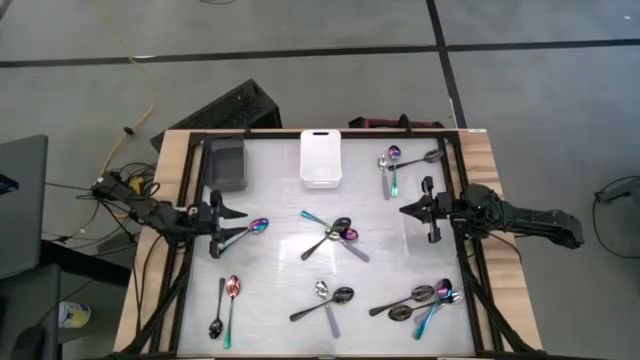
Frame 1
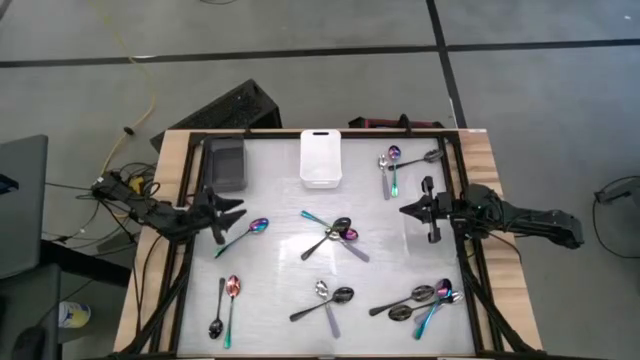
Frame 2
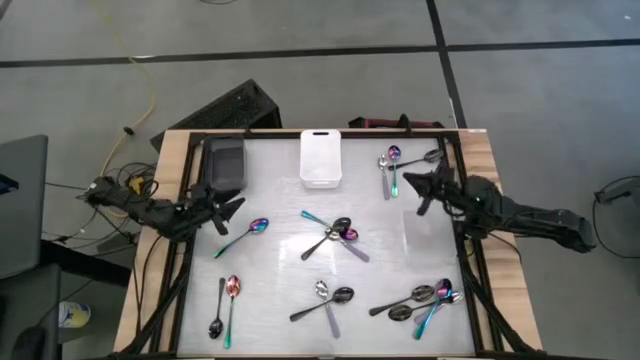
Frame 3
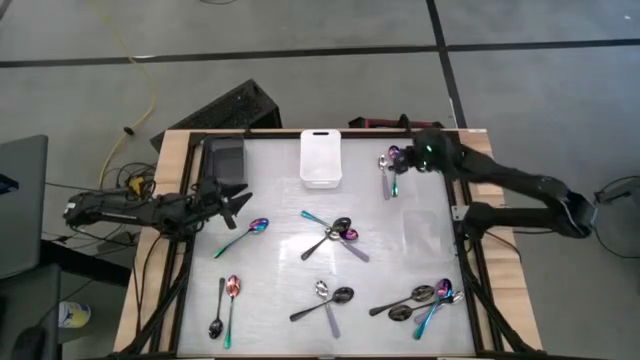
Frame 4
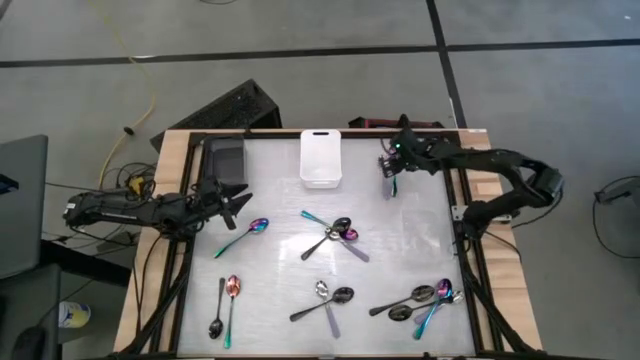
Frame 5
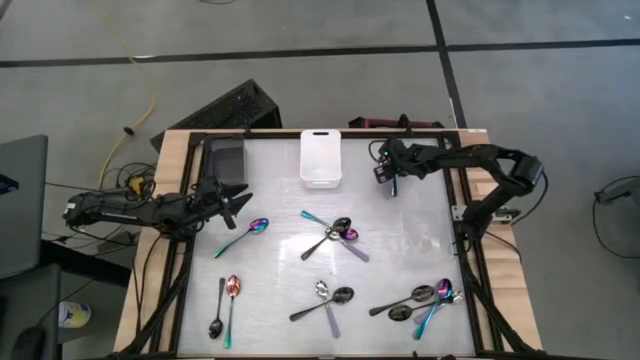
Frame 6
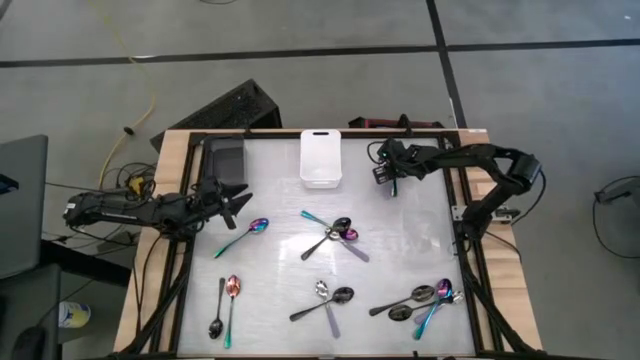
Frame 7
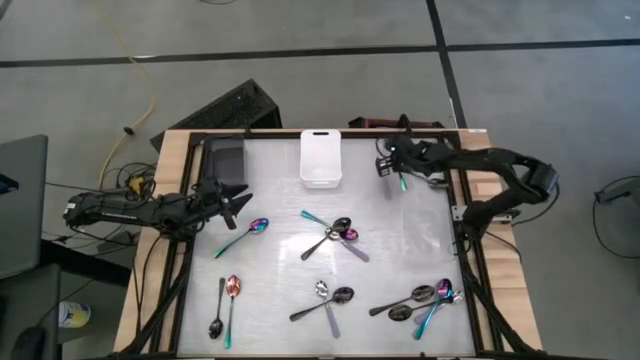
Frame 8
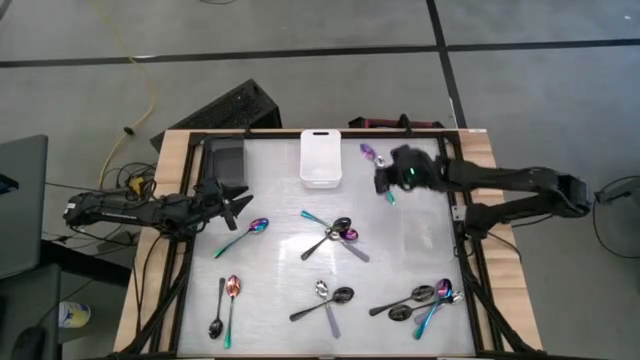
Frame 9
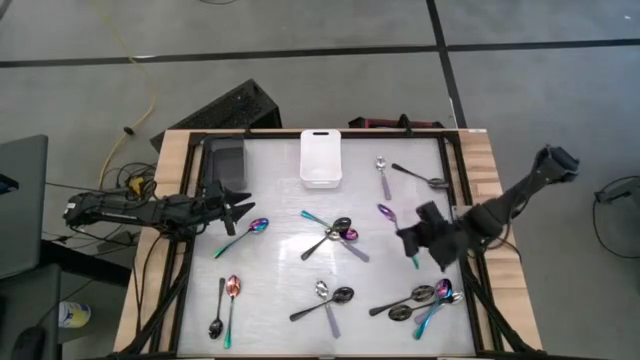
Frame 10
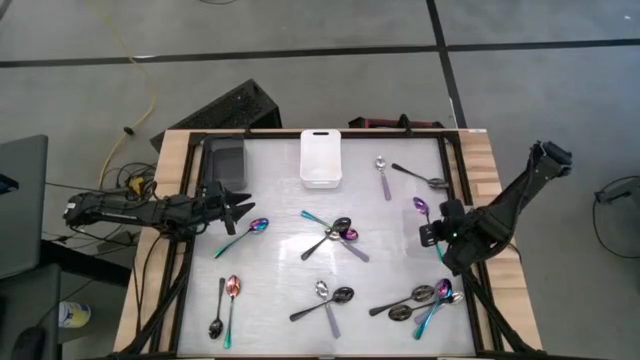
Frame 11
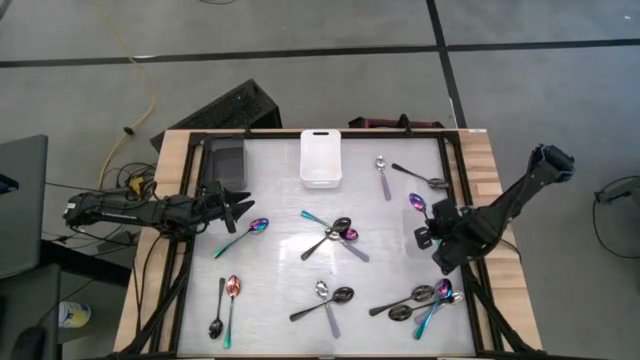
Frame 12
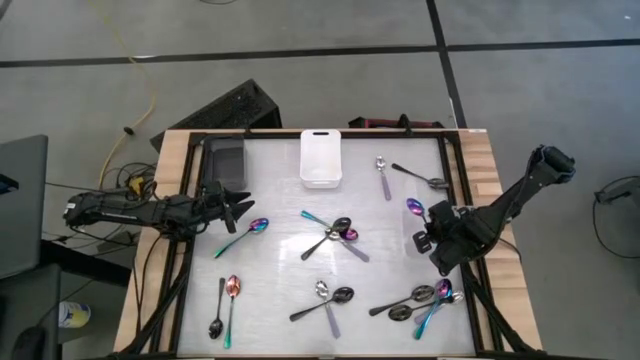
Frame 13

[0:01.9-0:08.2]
Task: Sort silverware by color (type)
Put the blue spoon into the transparent bin

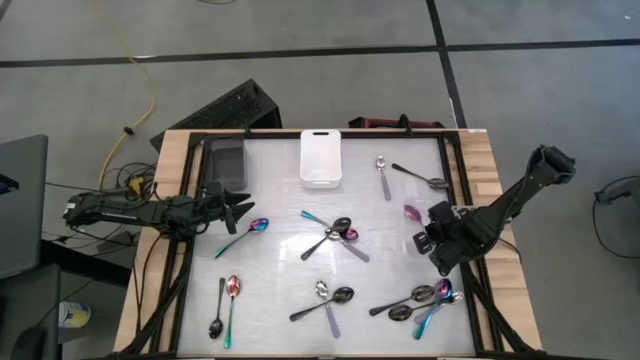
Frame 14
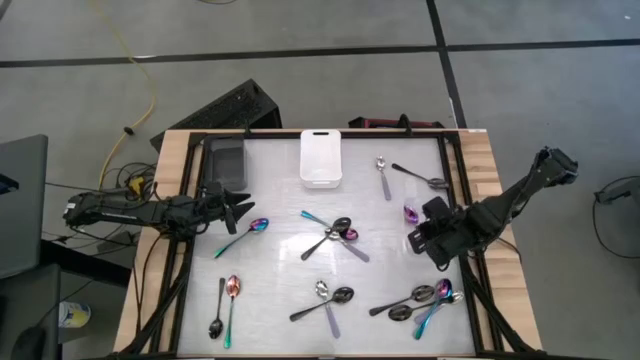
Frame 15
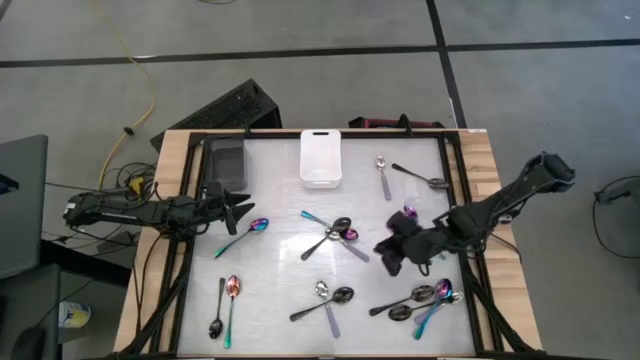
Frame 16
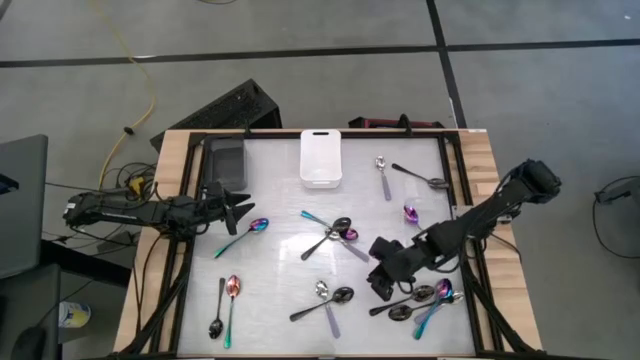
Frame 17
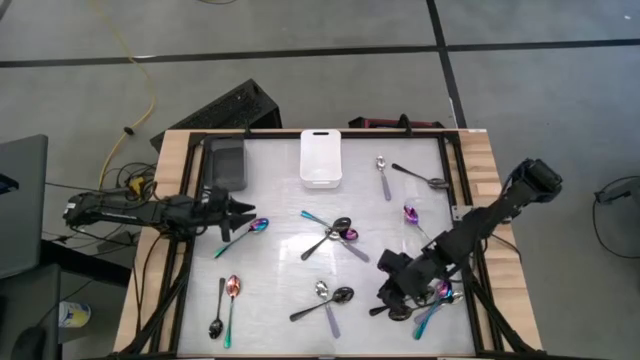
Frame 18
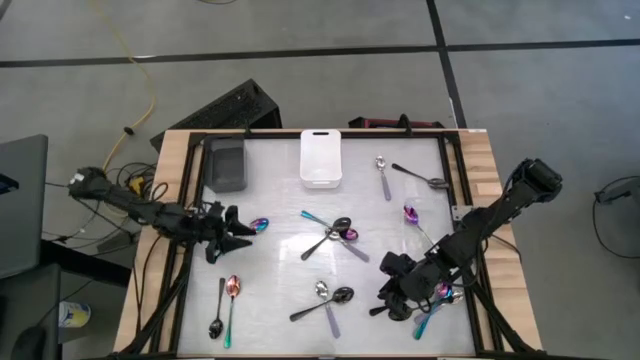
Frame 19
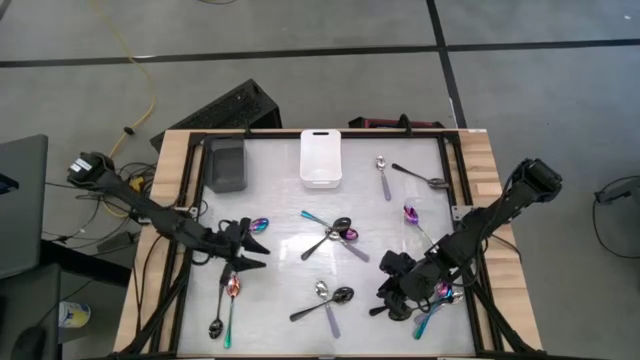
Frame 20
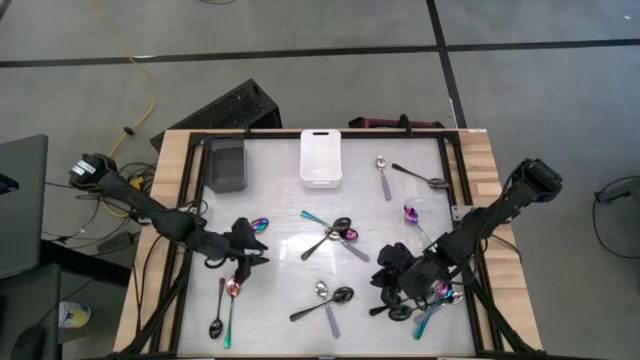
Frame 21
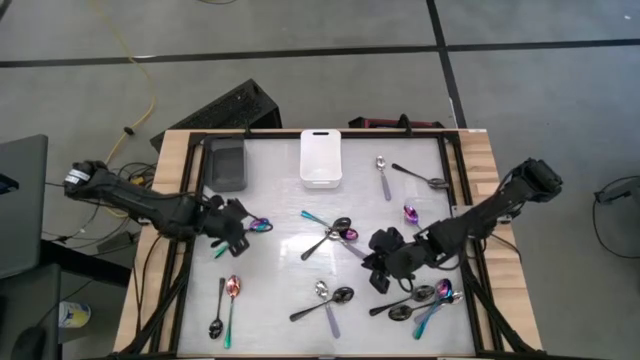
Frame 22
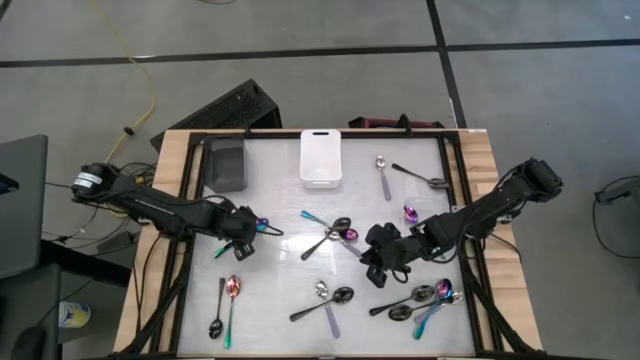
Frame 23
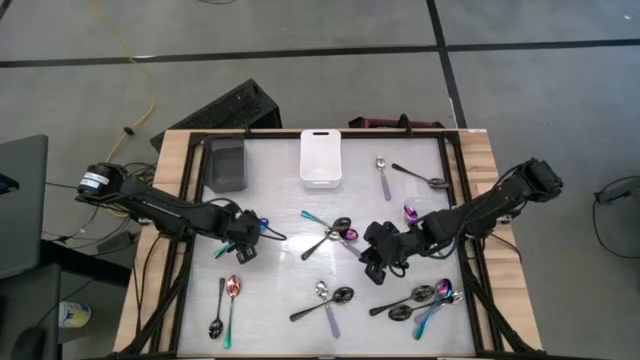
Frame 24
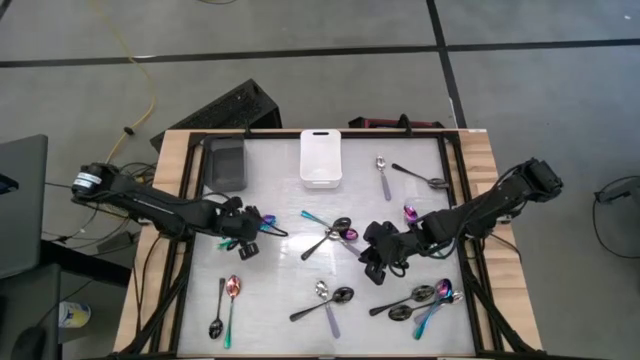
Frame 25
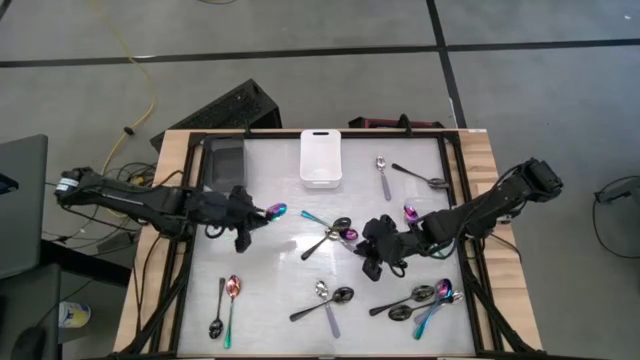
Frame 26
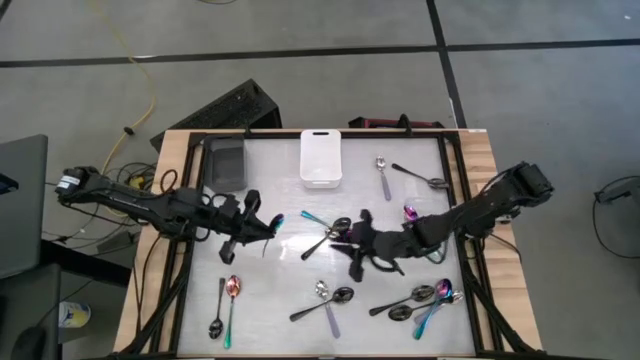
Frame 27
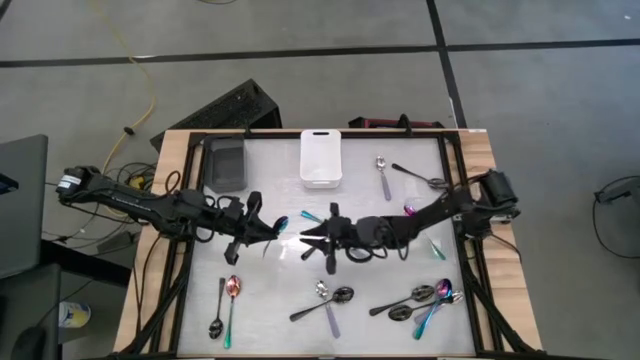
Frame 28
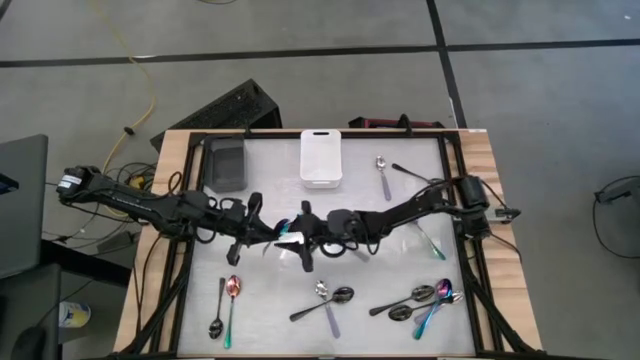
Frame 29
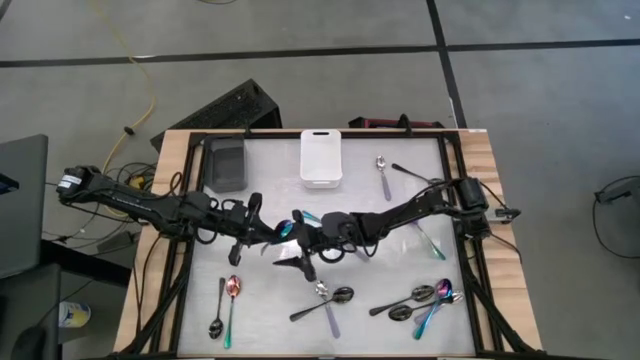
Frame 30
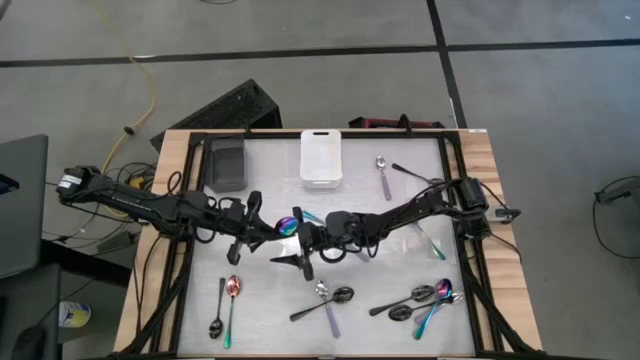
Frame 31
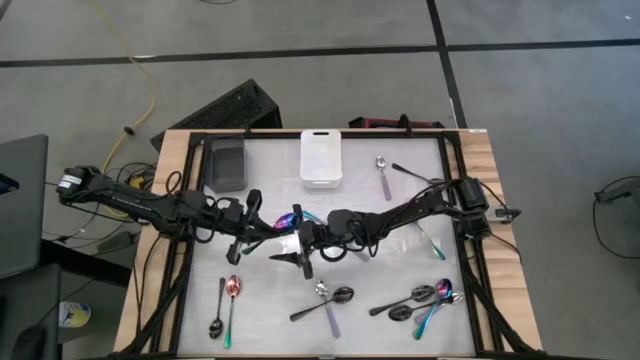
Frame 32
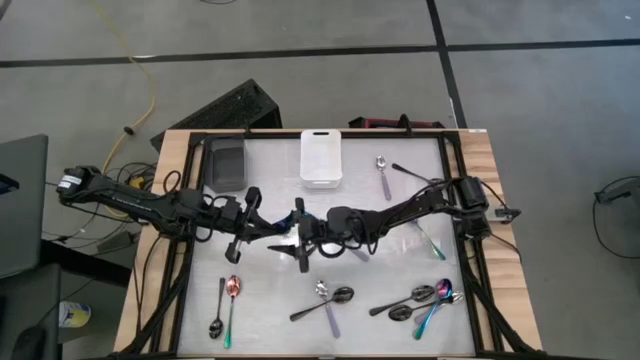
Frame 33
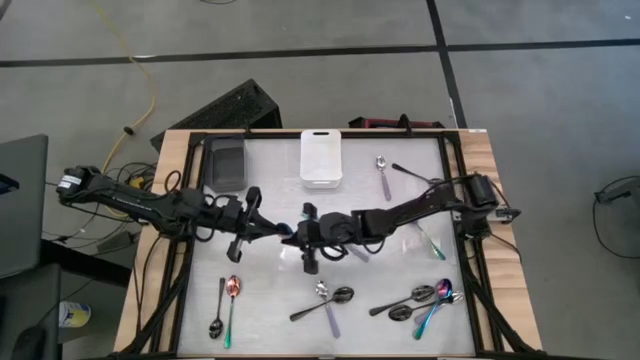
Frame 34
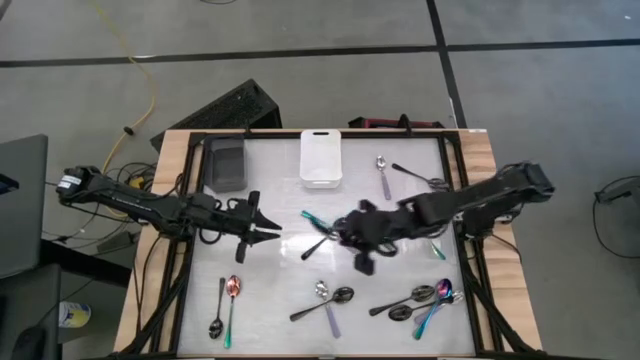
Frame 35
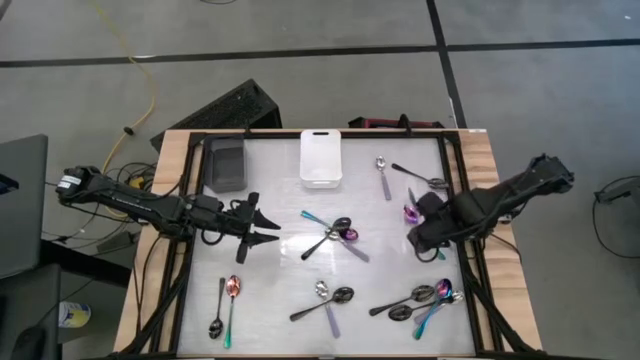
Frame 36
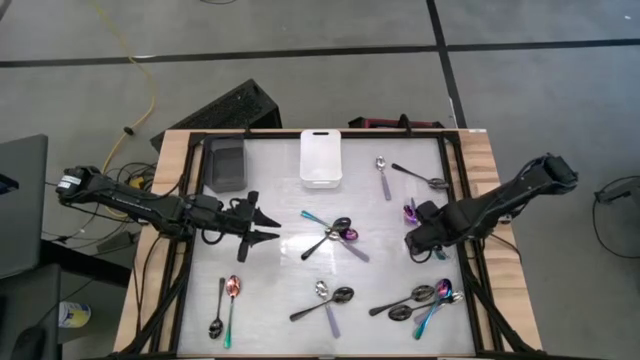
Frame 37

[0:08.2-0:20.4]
Put the blue spoon into the transparent bin

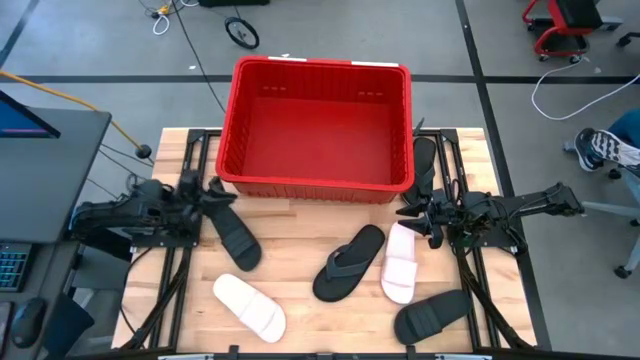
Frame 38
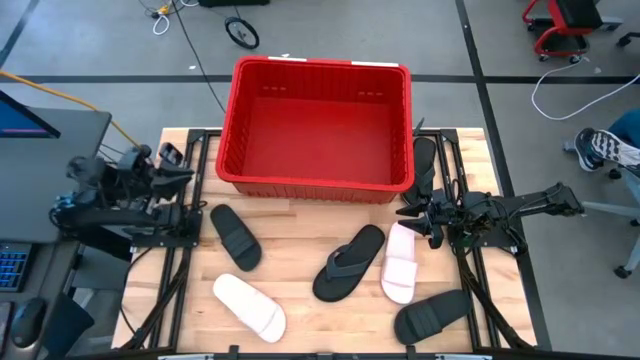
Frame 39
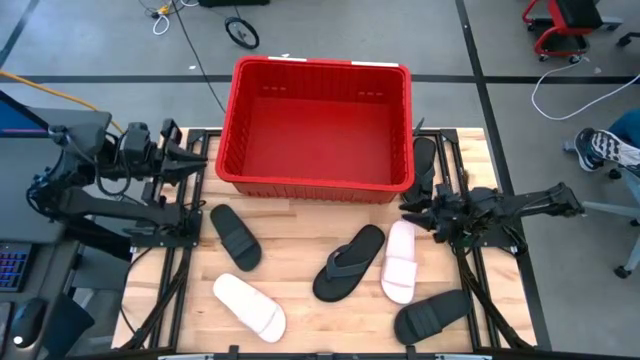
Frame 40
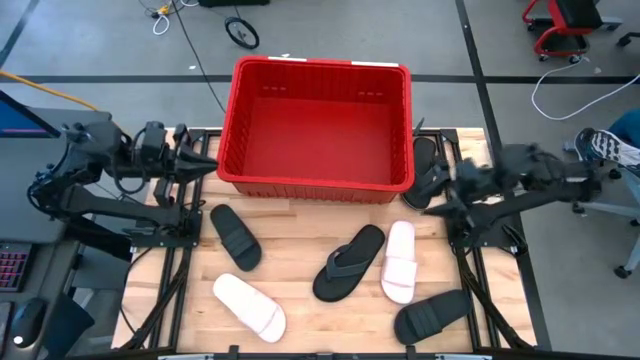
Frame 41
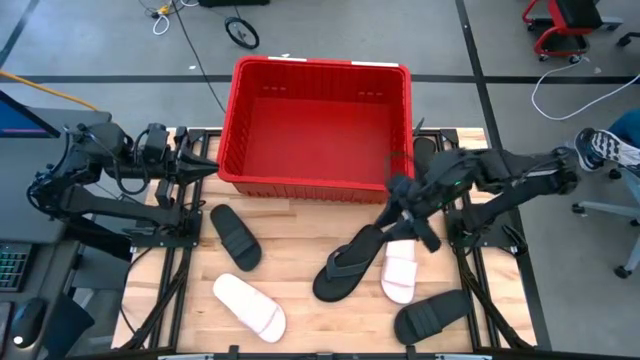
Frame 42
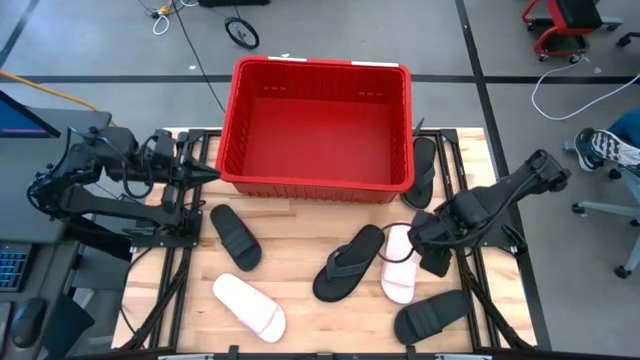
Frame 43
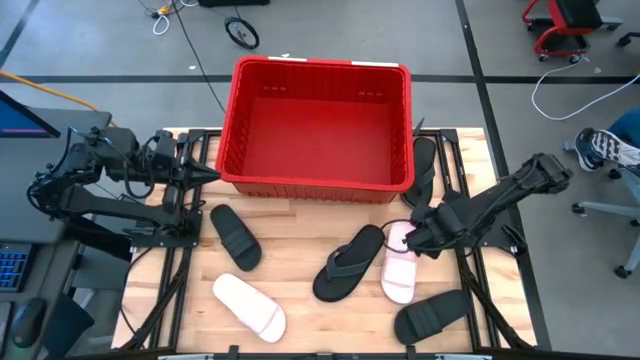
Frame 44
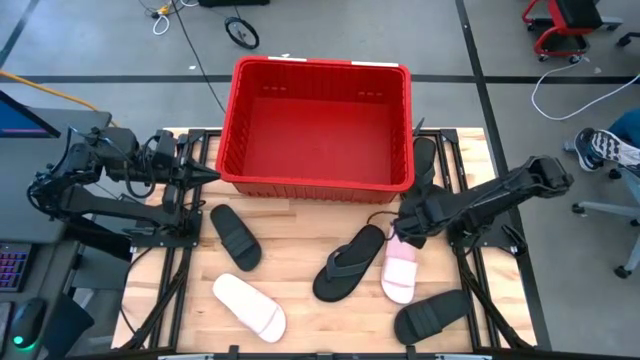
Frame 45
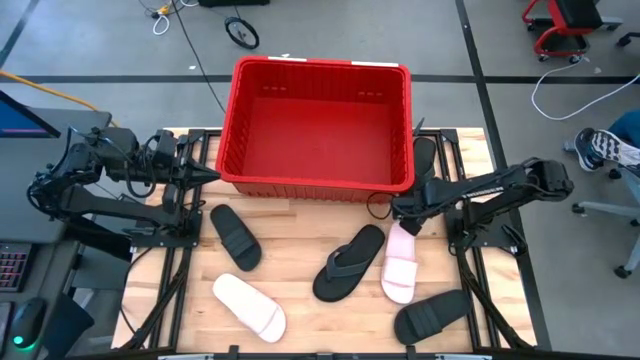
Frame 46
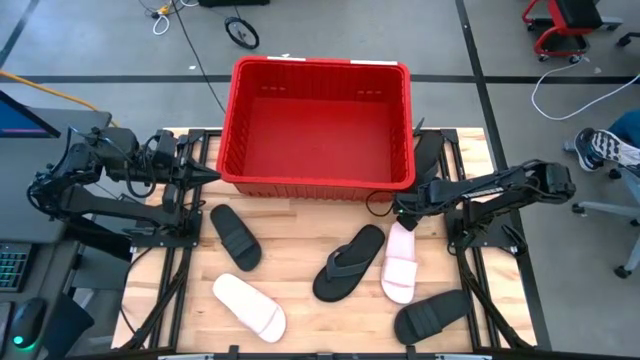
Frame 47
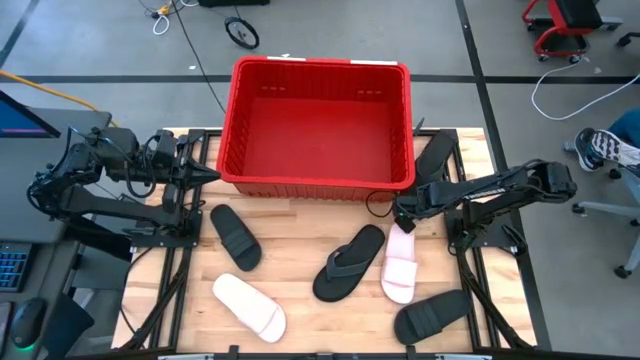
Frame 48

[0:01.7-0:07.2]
Task: Pick and place slides into bin
Put the top black slipper into the red container
